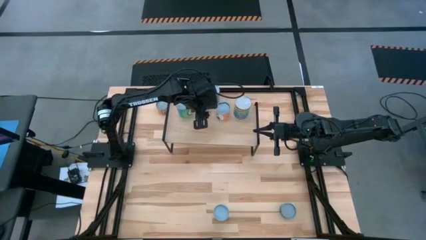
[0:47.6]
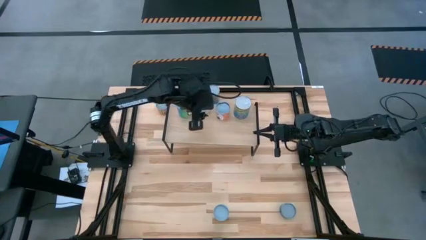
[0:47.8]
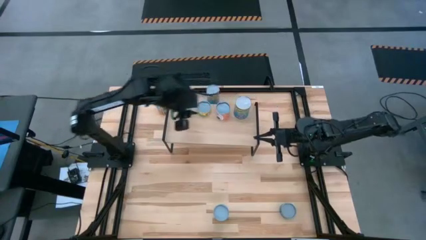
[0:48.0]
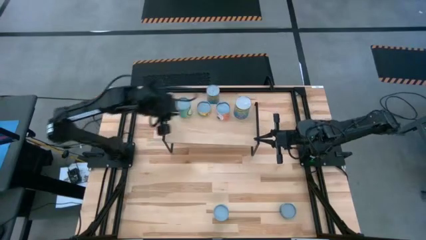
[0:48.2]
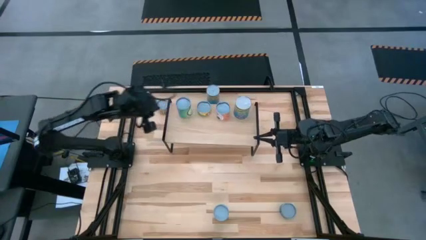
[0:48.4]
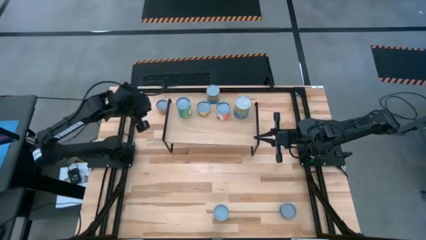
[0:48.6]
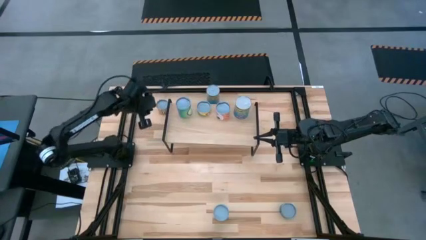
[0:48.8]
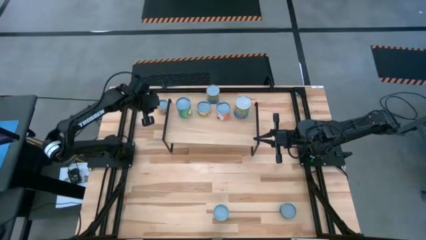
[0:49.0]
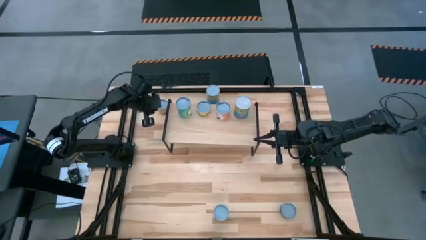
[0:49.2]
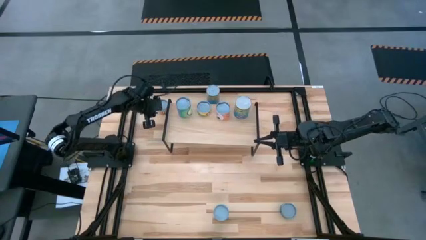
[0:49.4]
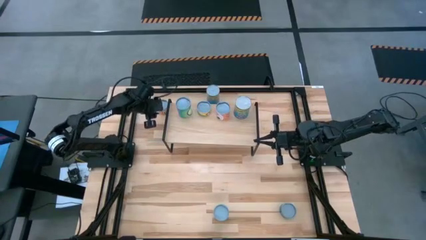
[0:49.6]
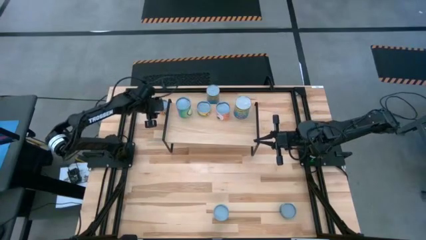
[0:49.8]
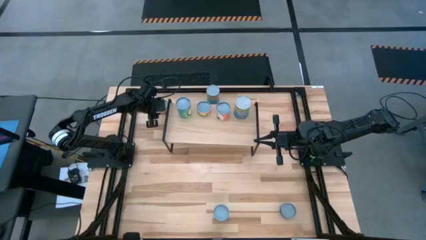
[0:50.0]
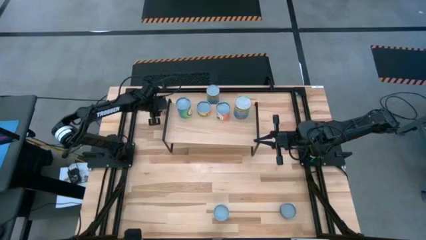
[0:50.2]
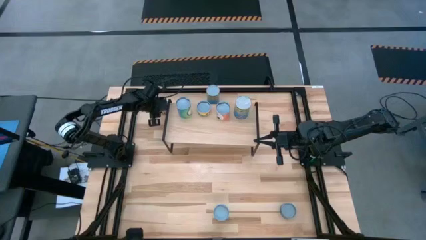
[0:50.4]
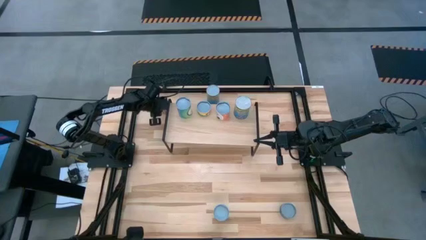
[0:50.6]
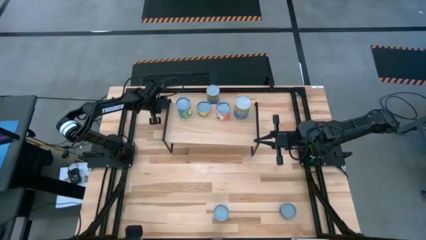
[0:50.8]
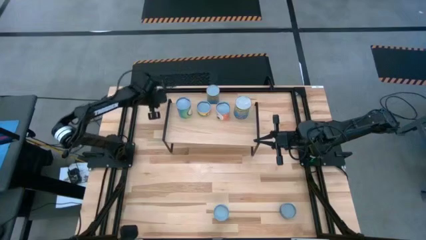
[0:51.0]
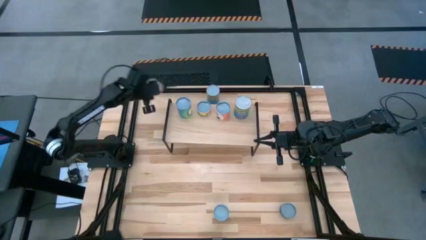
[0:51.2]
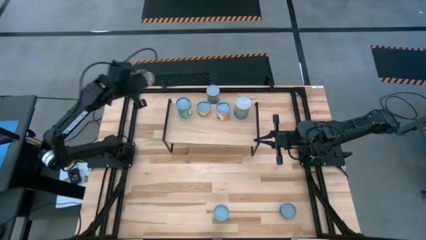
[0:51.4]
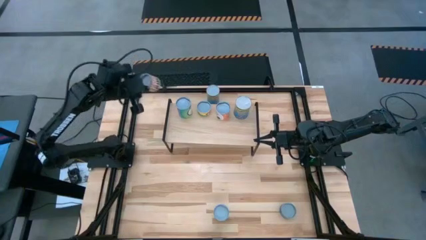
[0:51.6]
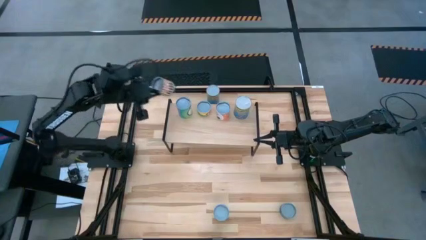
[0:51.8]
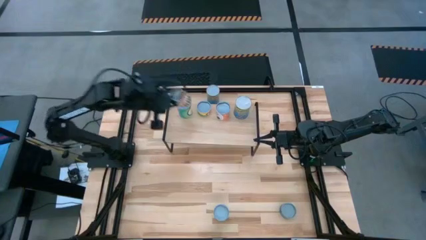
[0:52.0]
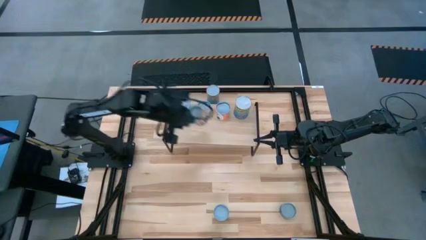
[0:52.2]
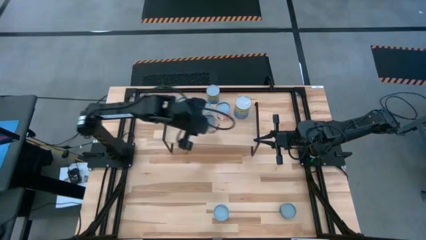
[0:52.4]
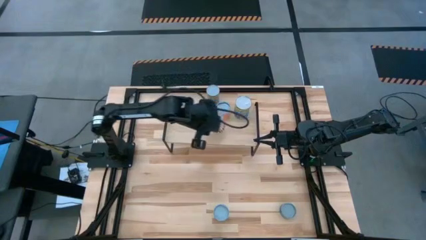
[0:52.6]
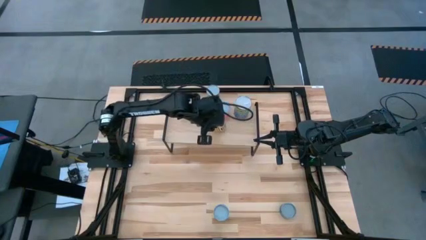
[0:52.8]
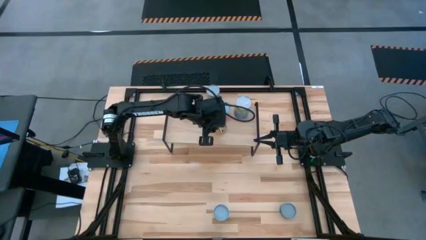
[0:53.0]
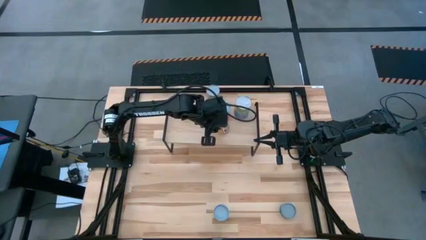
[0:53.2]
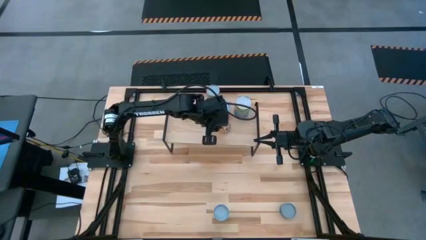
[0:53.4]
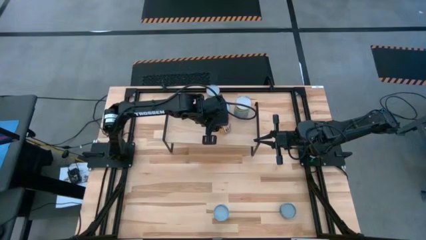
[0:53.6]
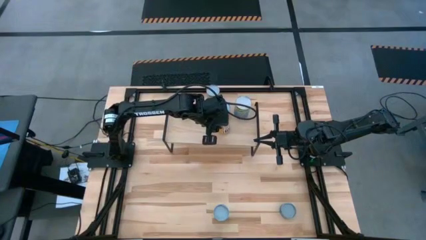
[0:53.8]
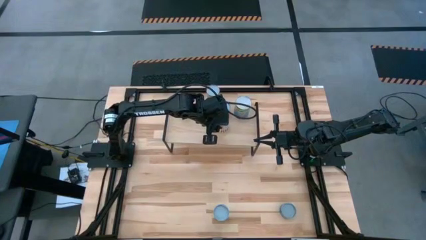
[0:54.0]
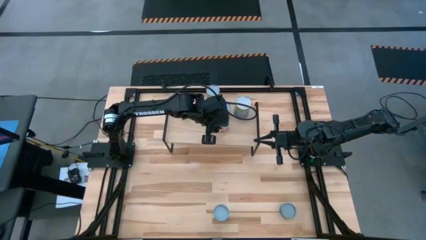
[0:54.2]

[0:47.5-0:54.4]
Task: Pick and place cans onto a shelf
Put the yellow-white can on the shelf

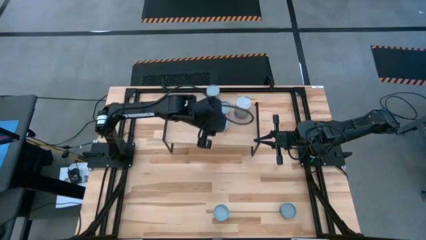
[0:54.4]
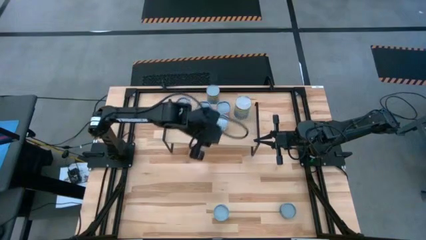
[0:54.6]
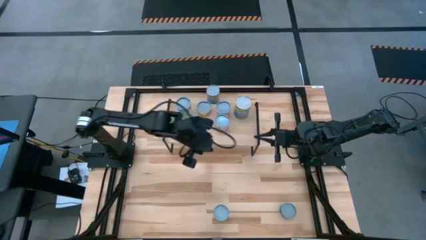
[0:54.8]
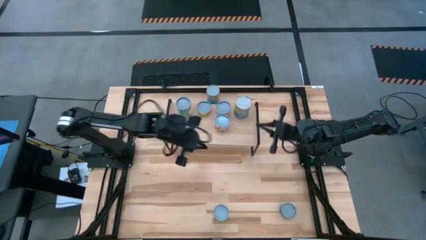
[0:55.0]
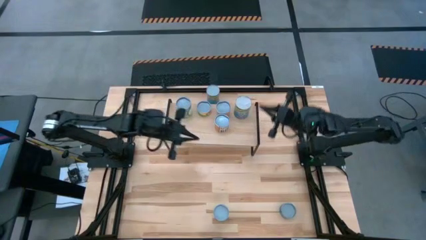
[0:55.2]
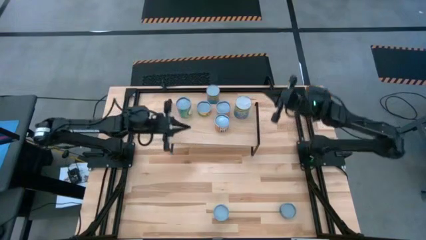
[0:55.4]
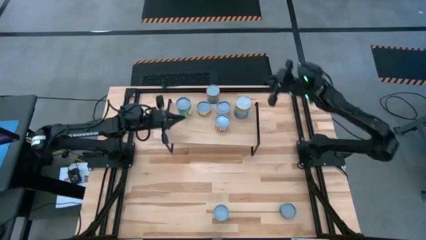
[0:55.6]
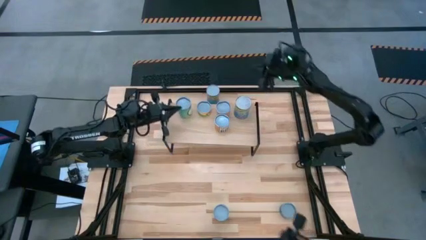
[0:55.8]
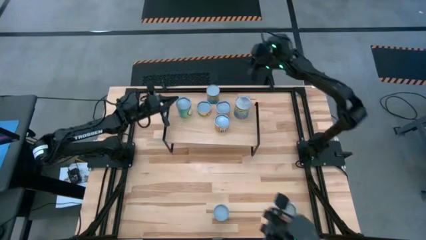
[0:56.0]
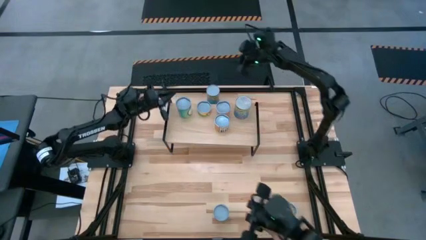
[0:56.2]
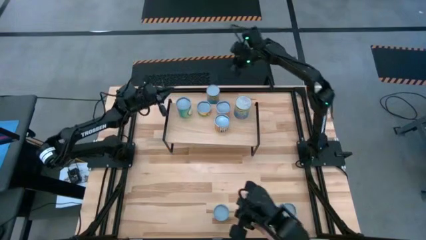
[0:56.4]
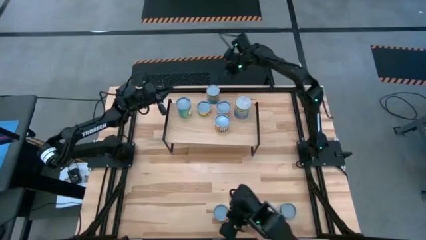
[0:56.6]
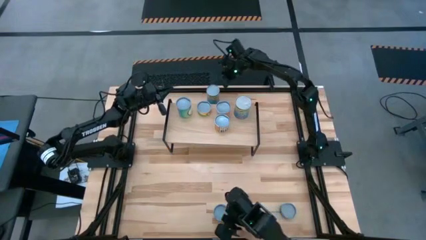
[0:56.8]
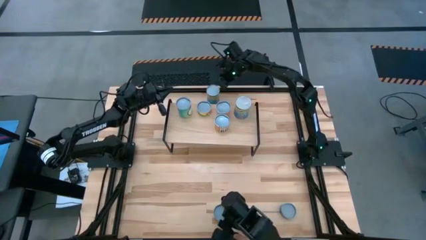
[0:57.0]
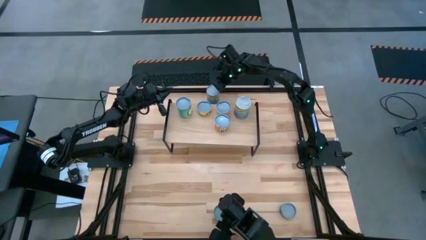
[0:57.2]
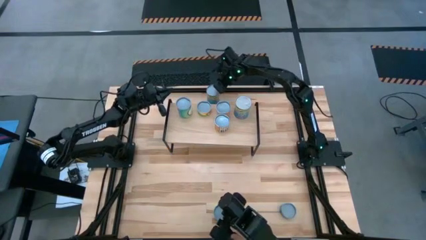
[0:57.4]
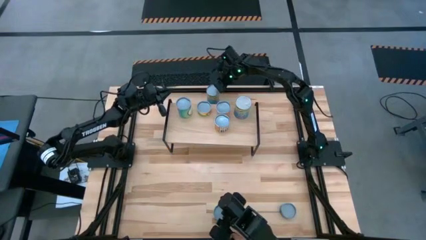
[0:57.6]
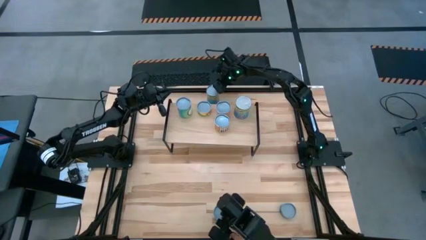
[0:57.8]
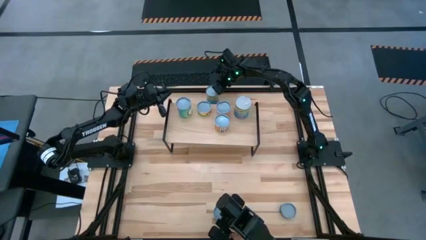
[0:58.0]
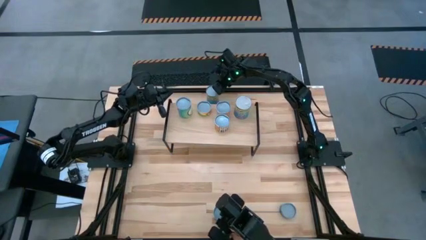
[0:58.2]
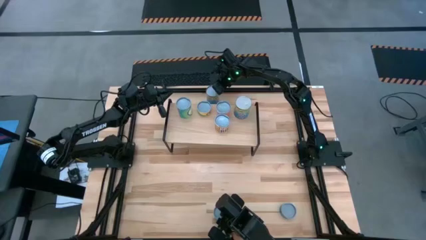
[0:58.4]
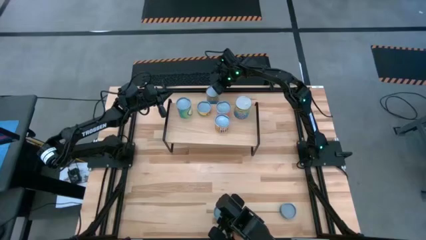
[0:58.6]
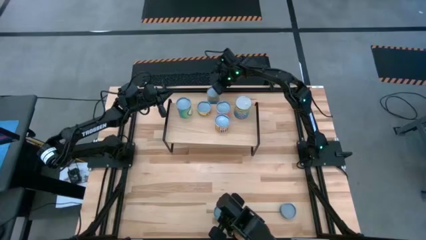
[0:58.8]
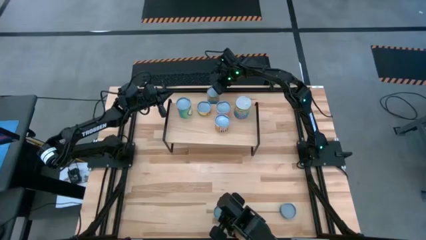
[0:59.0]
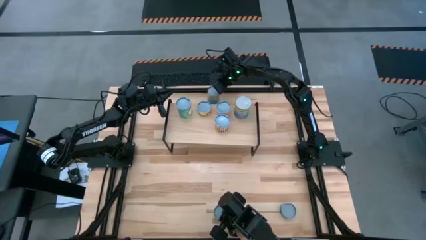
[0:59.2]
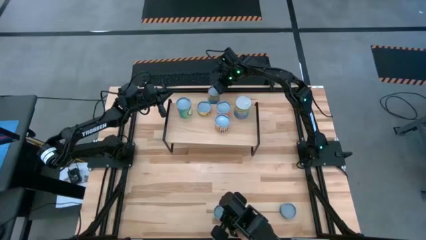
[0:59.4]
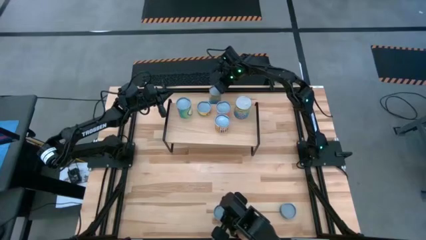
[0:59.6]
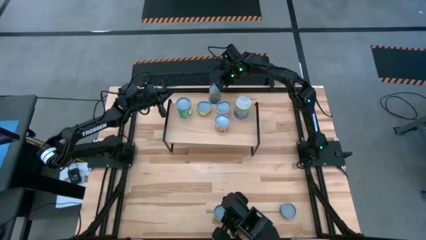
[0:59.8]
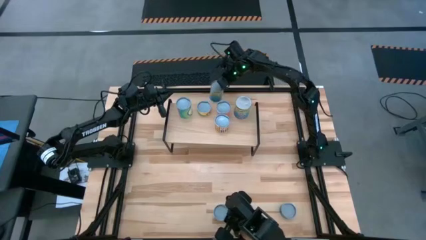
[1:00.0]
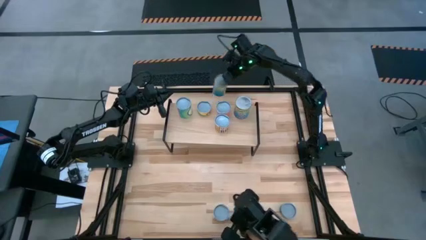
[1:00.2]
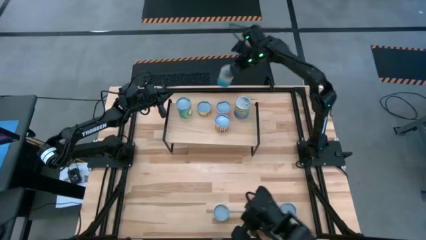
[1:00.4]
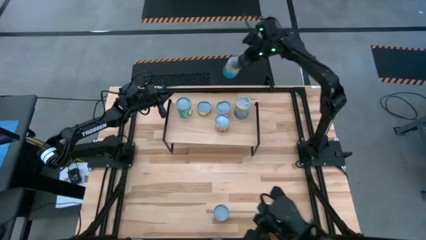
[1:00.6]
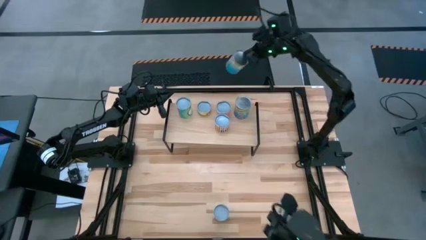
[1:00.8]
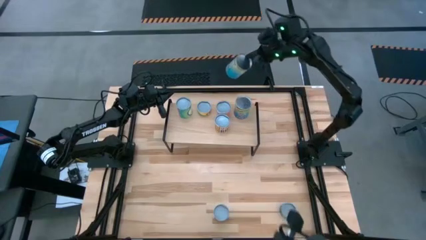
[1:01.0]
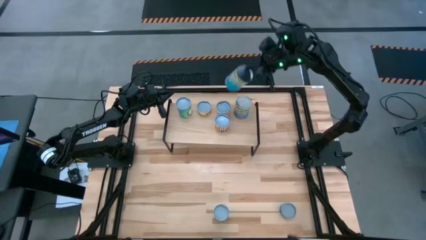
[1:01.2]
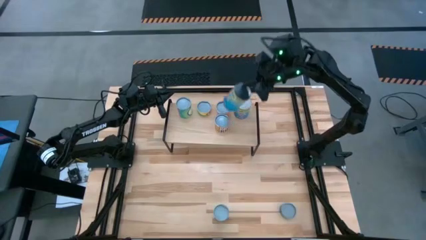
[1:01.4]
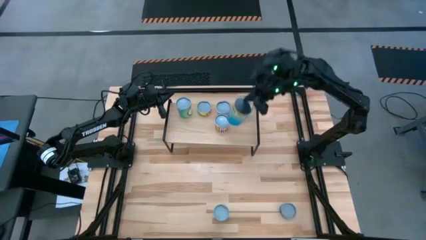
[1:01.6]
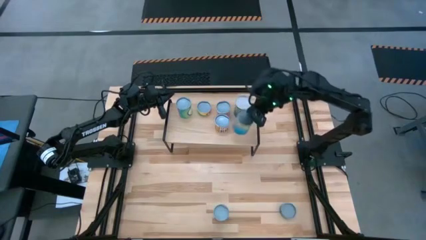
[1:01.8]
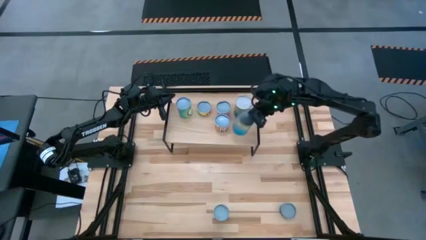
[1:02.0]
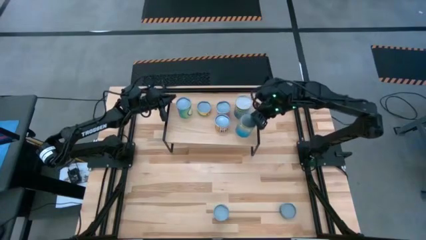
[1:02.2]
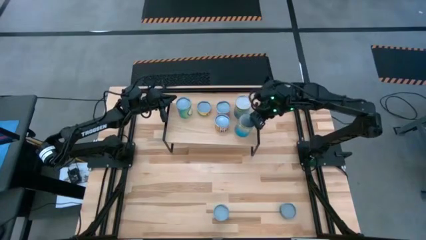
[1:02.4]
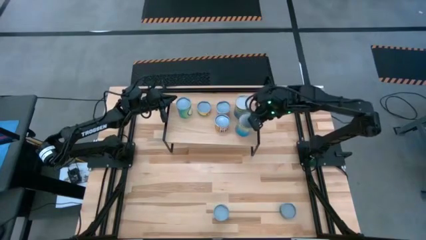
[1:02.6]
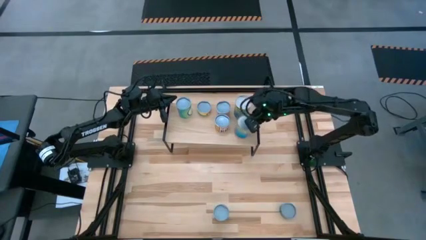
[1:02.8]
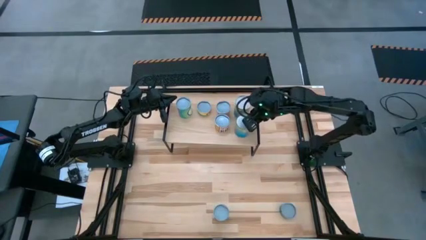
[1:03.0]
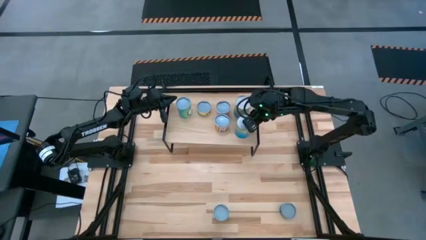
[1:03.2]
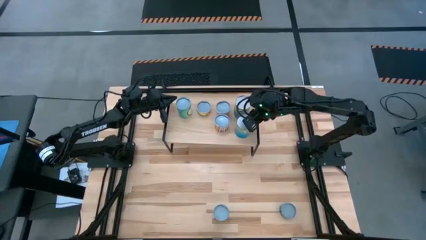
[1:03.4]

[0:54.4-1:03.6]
Put the blue can on the shelf

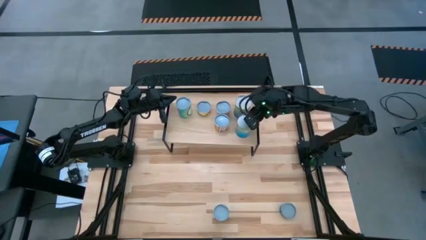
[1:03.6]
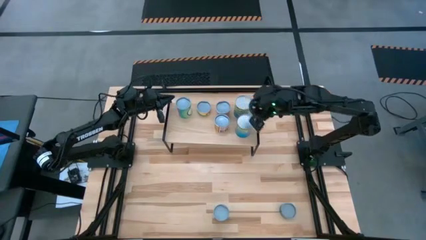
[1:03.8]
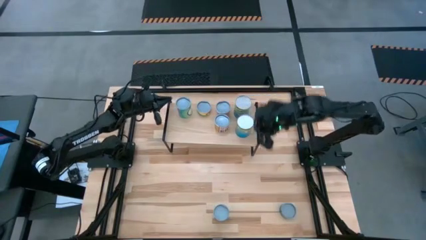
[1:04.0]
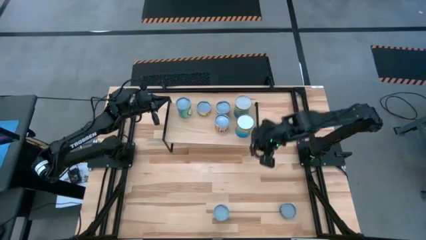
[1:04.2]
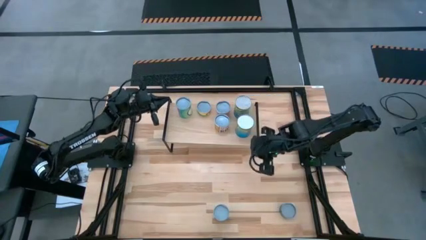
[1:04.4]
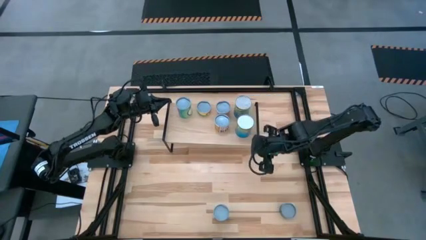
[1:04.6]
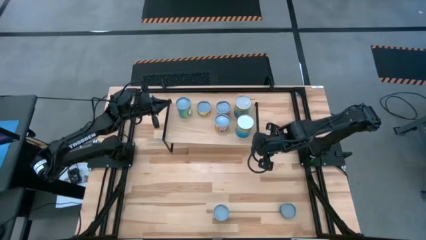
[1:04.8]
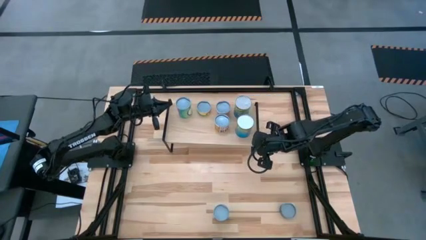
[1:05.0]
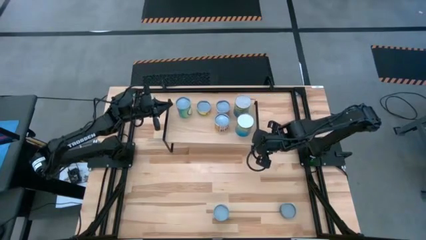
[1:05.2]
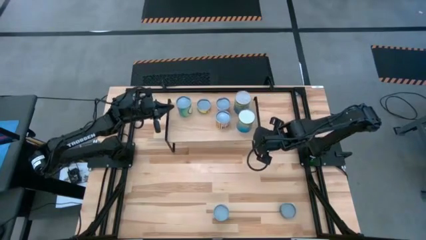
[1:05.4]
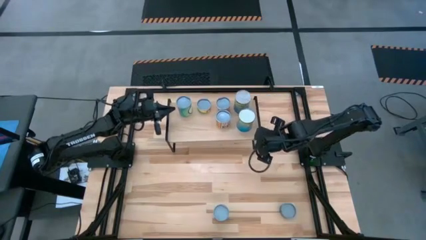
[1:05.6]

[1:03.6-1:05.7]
Adjust the shelf
